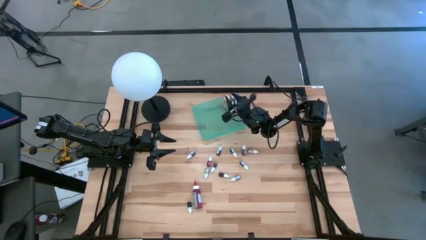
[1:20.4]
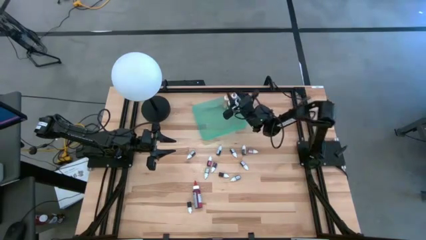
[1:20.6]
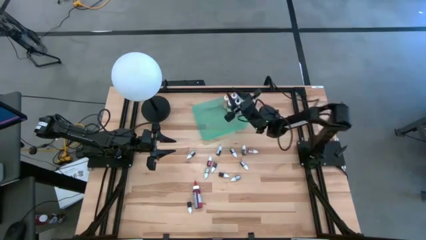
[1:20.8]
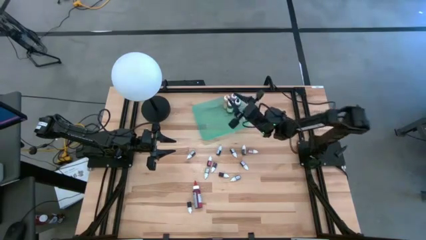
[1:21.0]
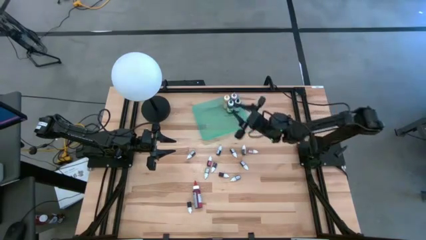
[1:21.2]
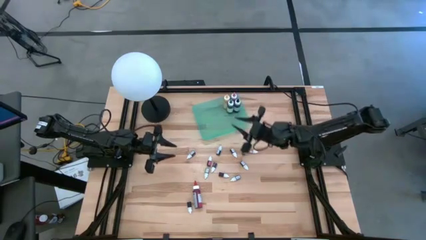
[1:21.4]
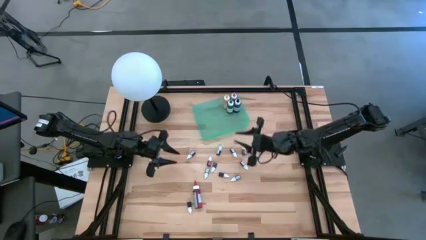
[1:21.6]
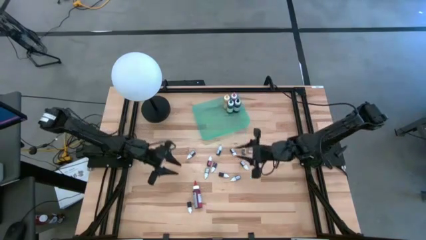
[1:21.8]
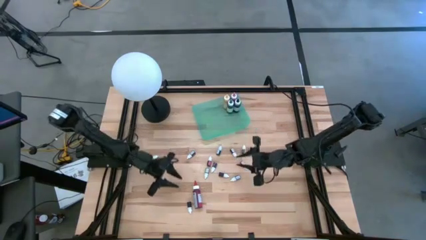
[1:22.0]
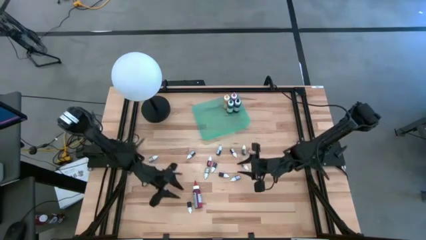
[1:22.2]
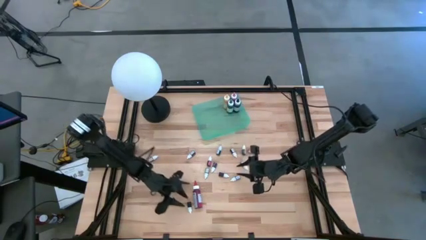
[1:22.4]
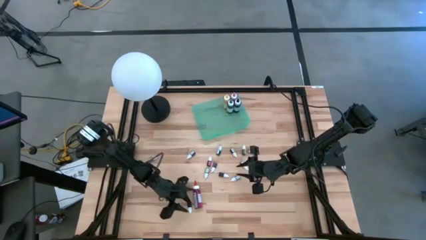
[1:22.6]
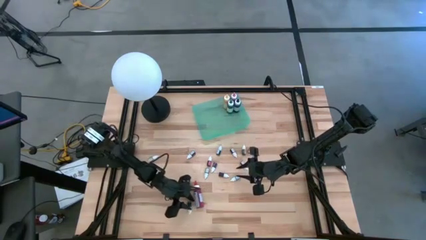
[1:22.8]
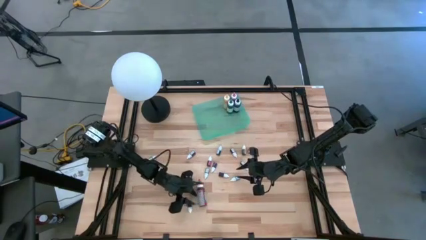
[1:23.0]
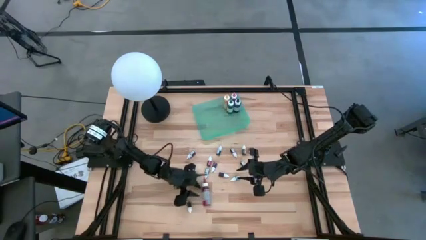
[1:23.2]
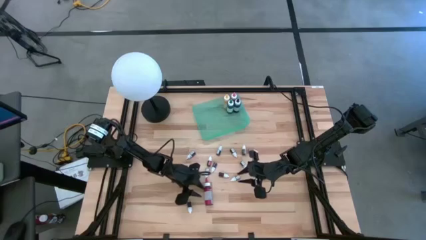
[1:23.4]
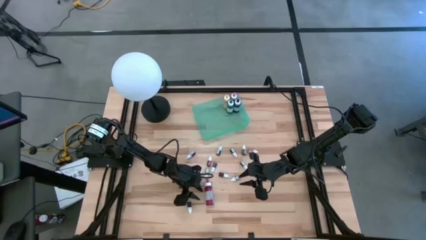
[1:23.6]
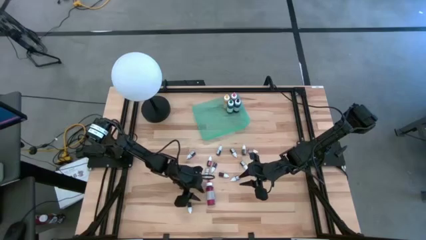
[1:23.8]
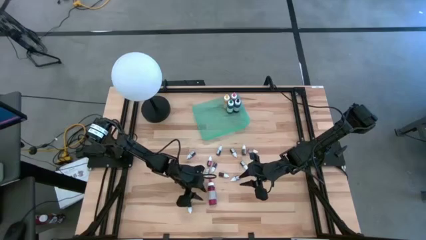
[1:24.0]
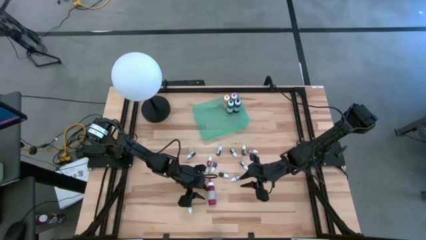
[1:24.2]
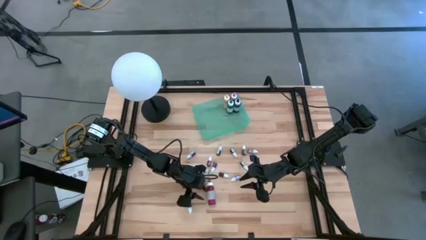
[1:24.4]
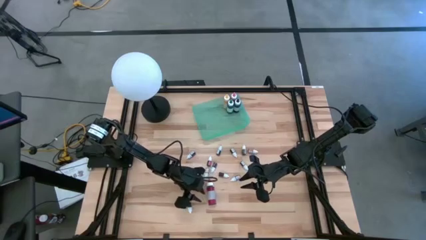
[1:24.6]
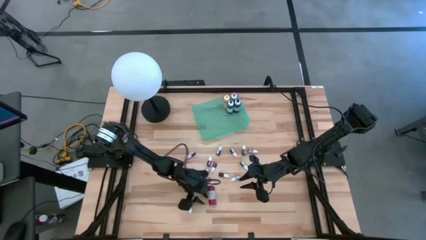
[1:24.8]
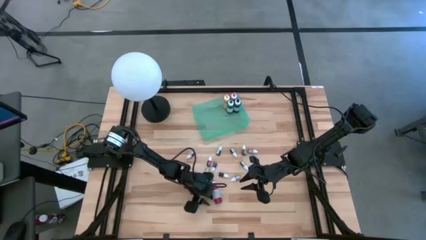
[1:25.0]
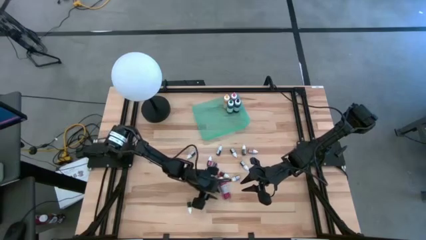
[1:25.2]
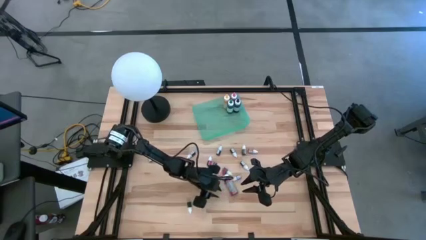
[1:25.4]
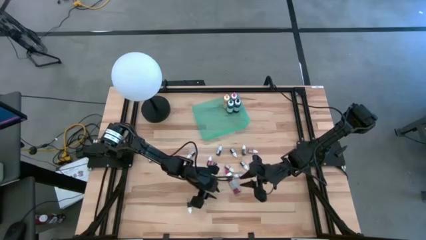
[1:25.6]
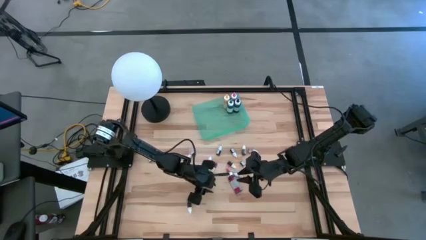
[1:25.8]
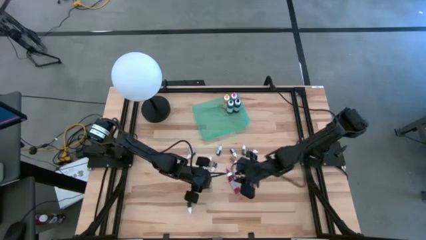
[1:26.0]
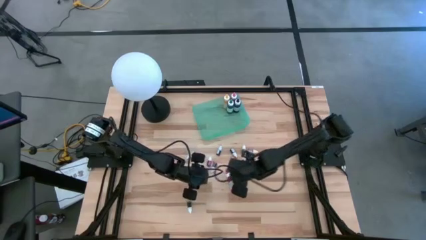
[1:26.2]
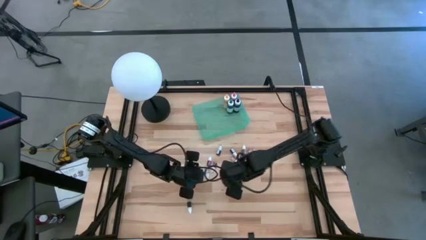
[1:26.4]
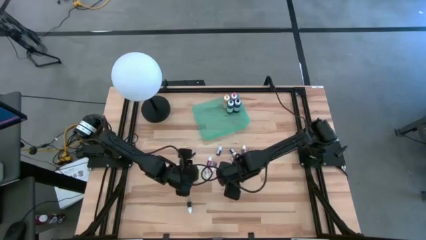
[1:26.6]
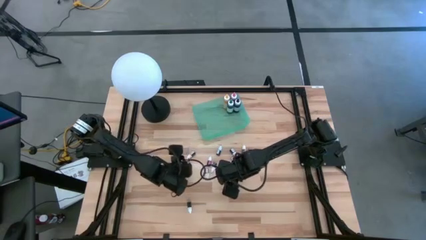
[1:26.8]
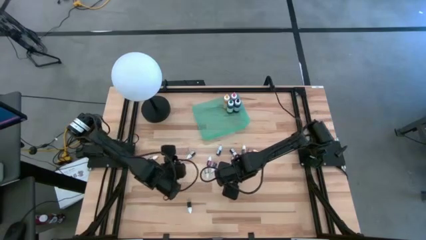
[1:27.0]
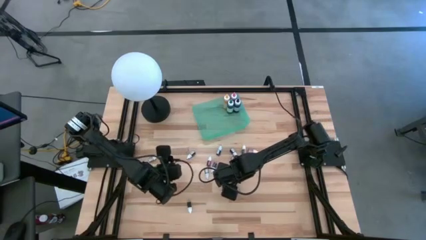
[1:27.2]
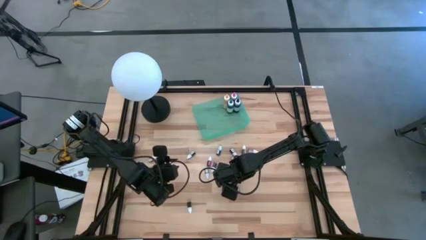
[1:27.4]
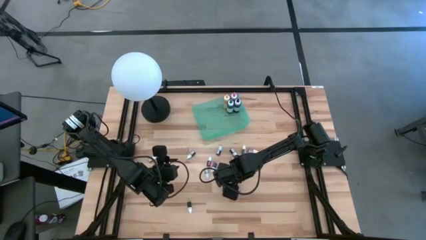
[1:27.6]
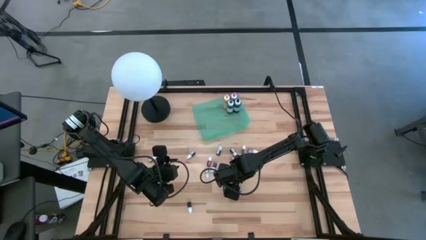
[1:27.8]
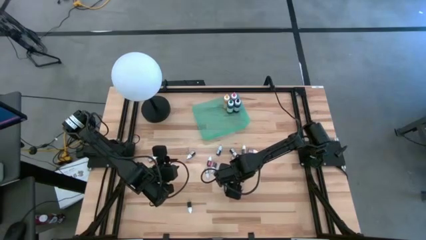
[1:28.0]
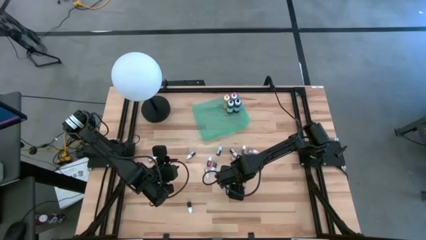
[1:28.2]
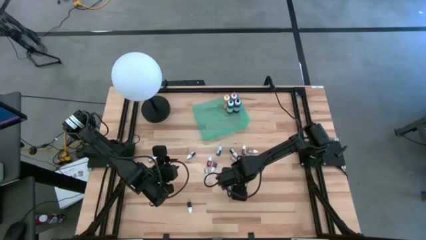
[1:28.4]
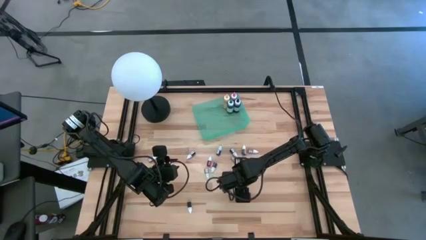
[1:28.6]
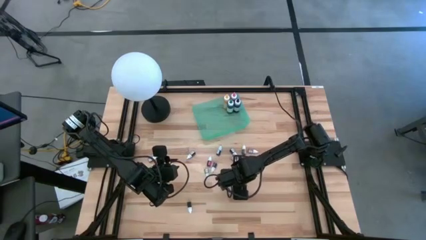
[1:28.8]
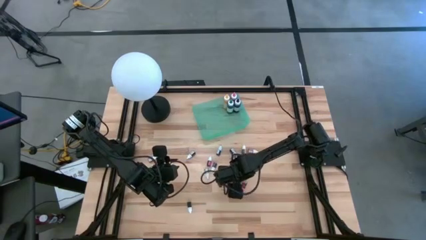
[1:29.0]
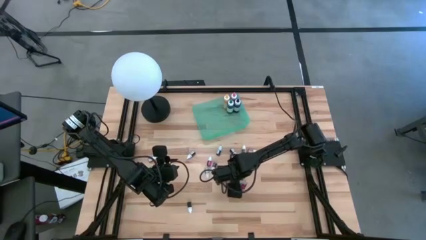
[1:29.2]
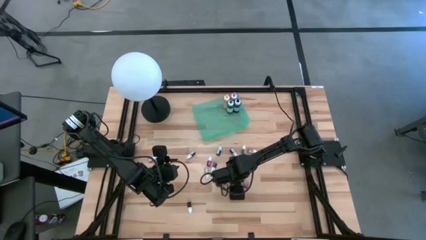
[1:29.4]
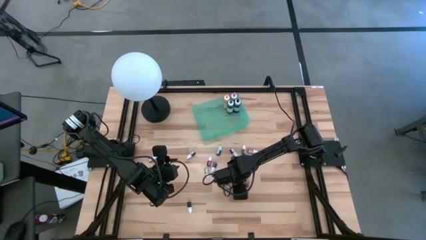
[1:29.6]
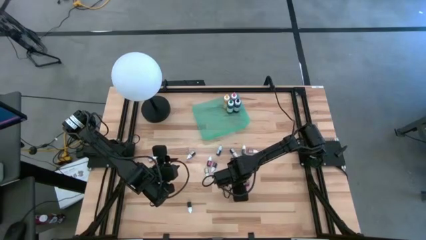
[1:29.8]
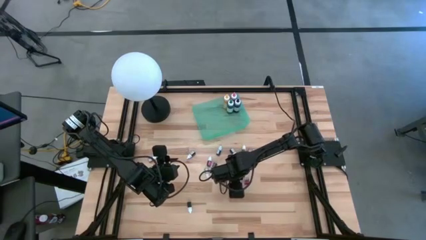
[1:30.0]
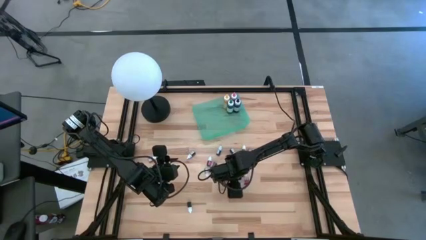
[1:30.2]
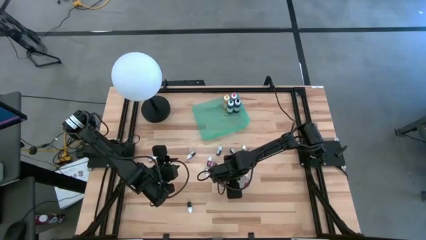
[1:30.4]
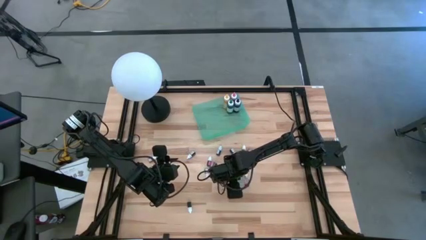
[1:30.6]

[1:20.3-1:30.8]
Task: Pick & Place food coloring
Put the red food coloring bottle into the green bin

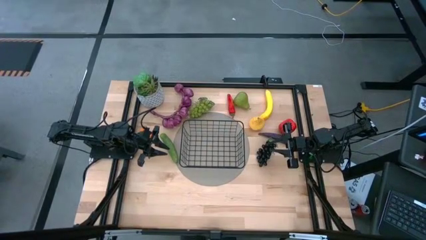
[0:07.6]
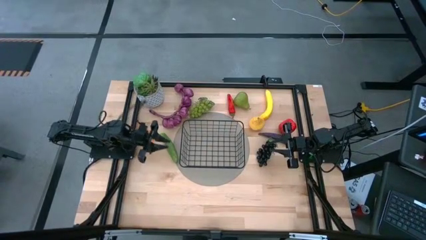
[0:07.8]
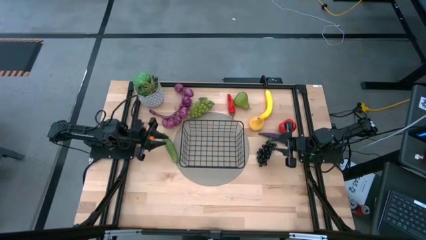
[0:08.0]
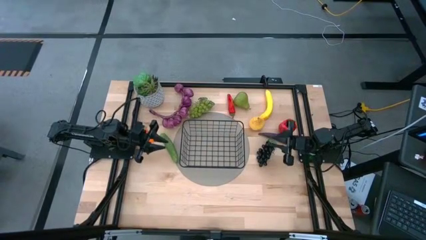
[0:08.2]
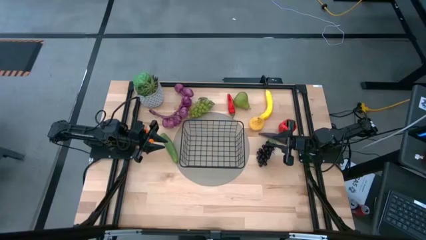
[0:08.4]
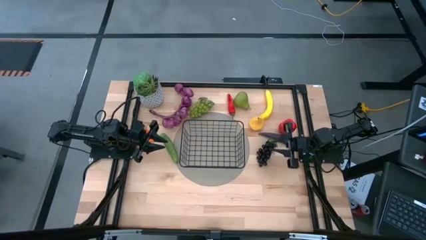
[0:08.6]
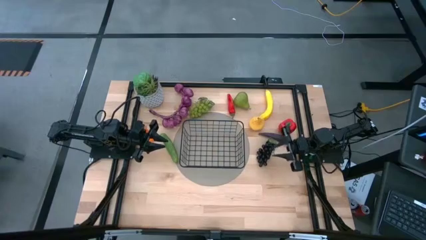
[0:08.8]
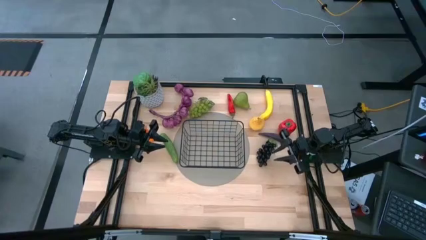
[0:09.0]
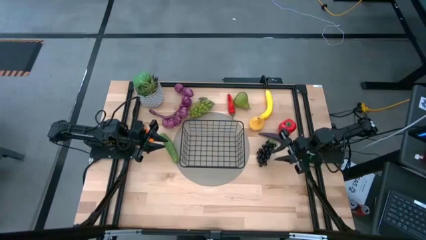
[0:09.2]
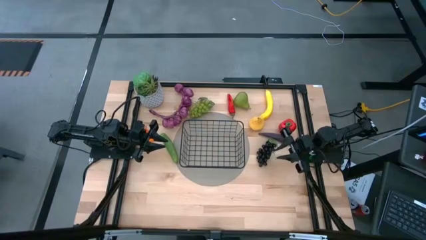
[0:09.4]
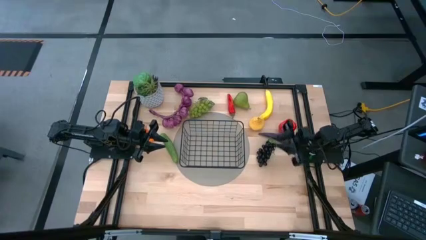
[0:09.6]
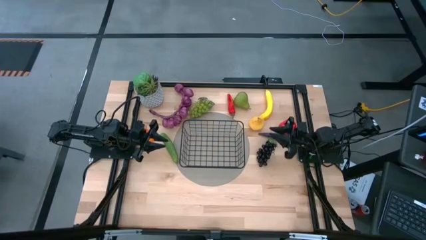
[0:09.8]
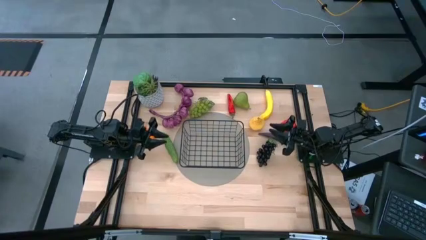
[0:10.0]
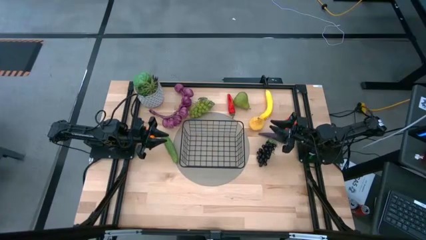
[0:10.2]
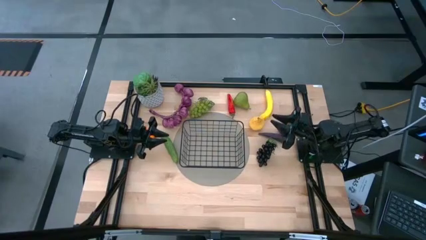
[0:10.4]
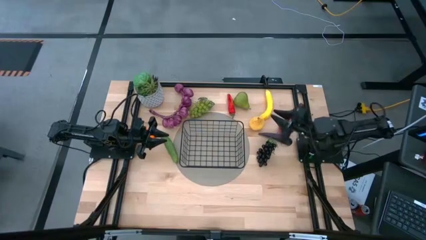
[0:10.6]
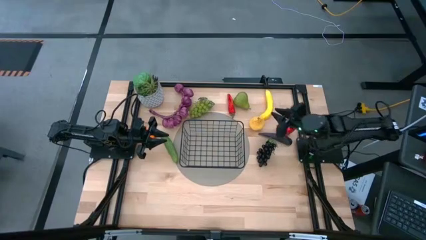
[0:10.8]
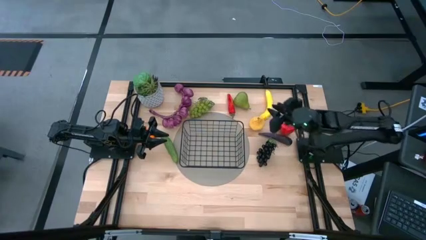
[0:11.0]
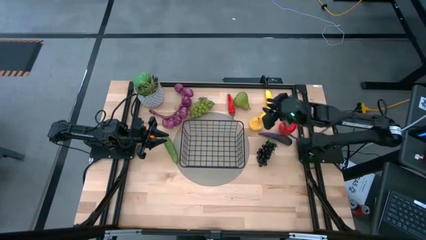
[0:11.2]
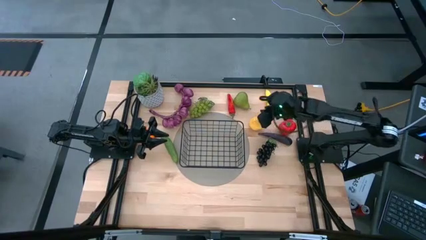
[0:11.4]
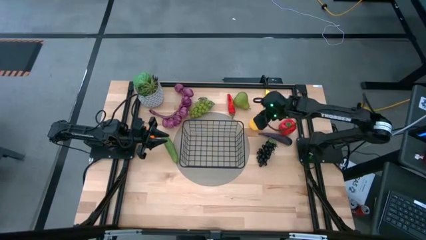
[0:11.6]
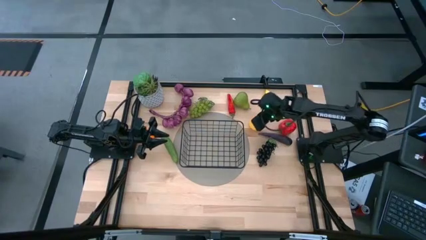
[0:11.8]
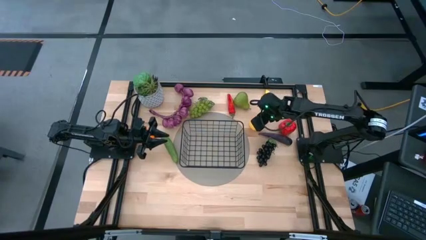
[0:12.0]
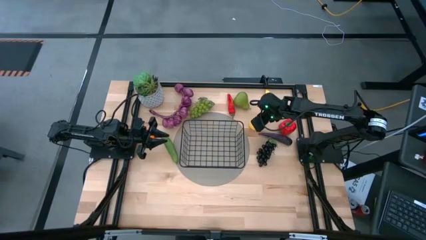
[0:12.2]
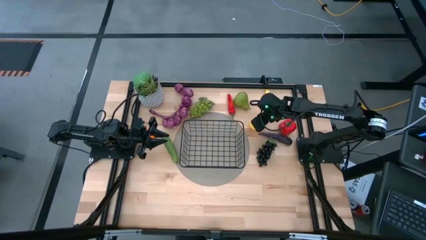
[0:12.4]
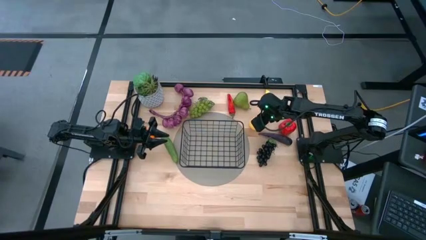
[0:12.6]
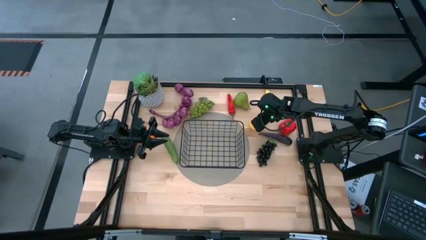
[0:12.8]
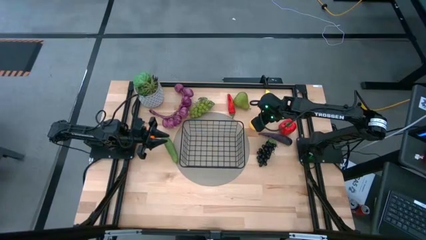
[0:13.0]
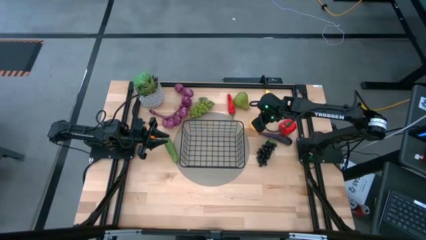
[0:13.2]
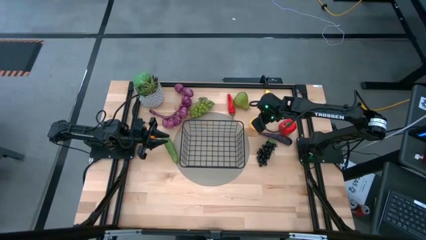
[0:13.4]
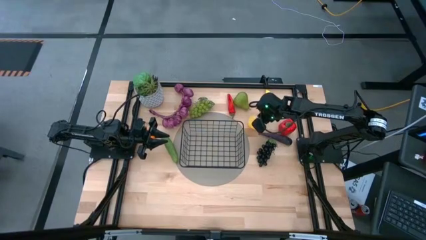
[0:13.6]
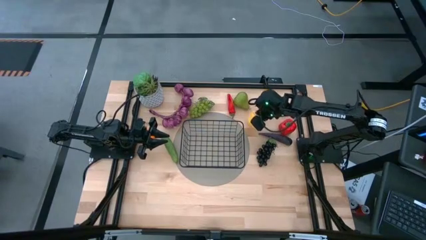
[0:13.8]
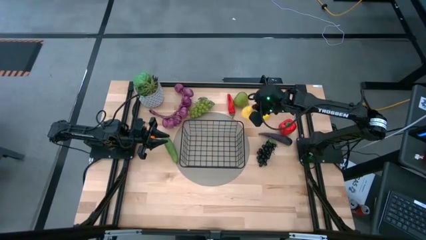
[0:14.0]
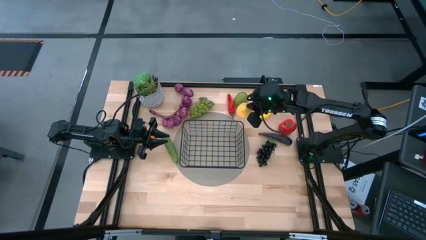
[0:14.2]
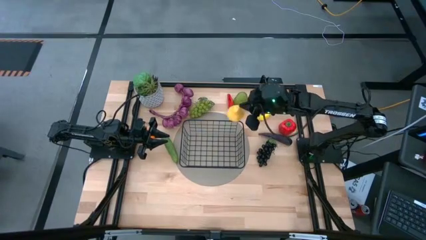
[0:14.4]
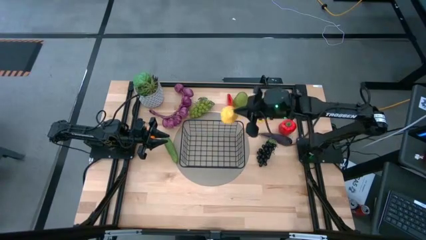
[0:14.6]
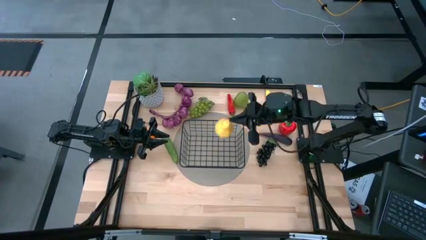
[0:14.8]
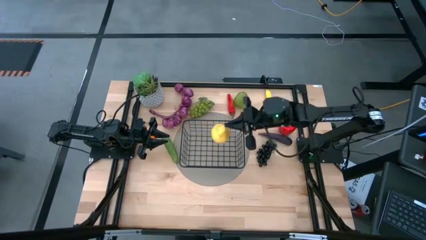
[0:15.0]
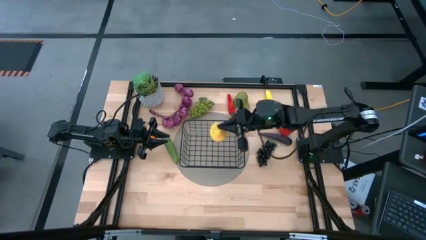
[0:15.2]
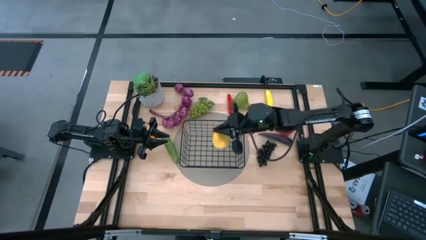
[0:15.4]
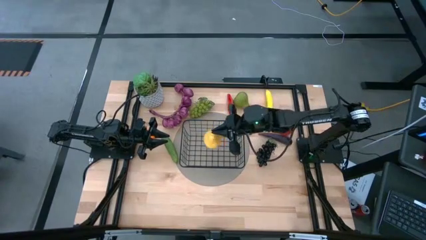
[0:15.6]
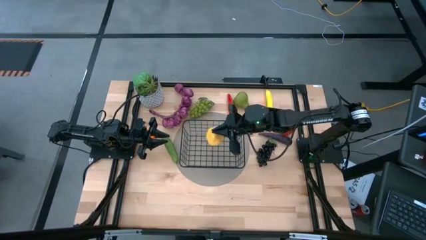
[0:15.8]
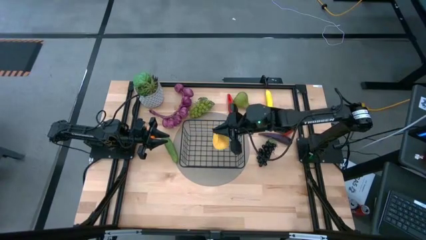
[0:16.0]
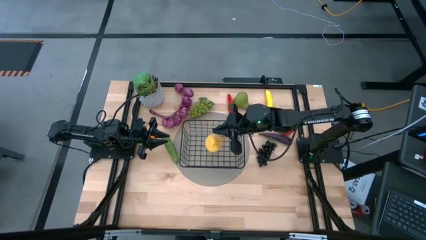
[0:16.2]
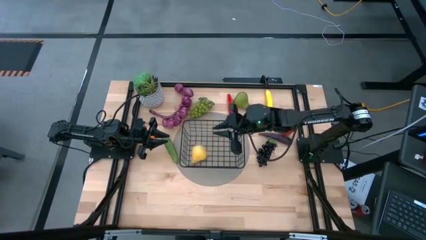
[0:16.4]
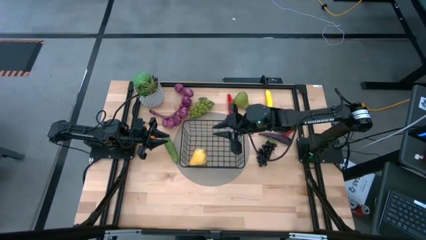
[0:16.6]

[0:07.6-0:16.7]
Task: Build produce basket
Put the yellow pear into the black wire basket
